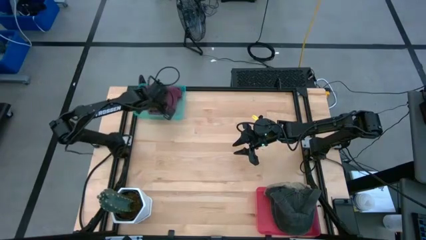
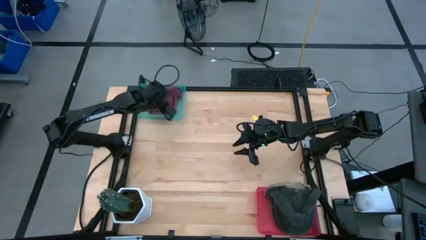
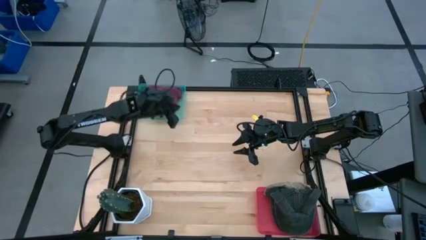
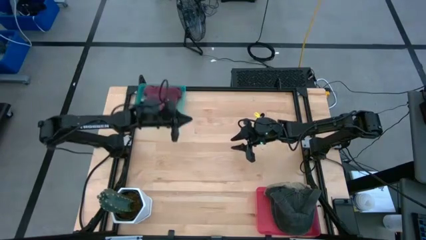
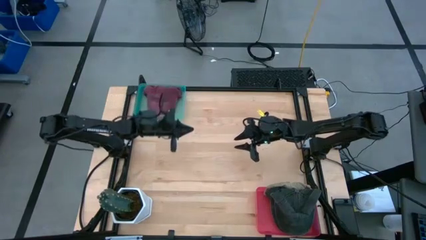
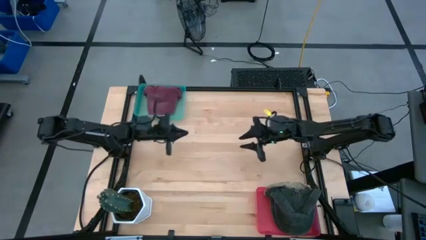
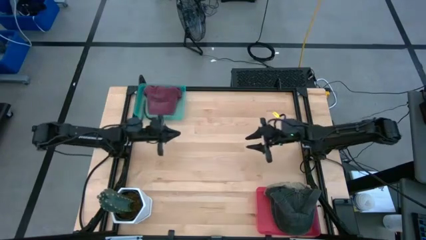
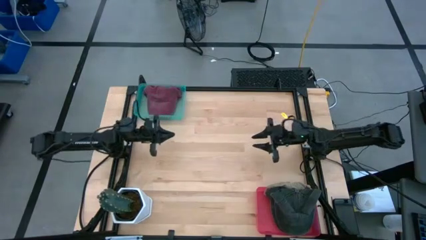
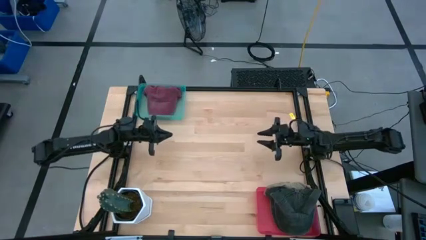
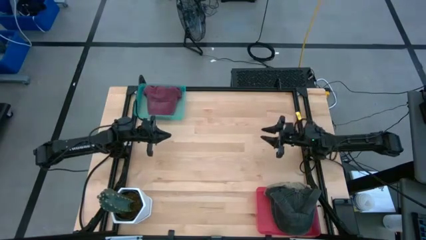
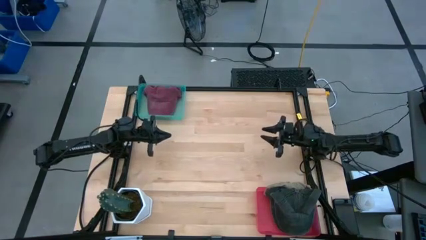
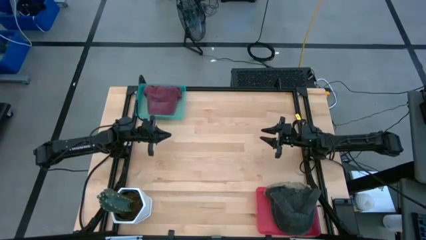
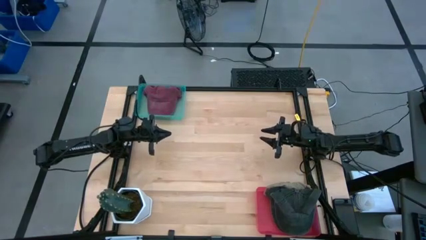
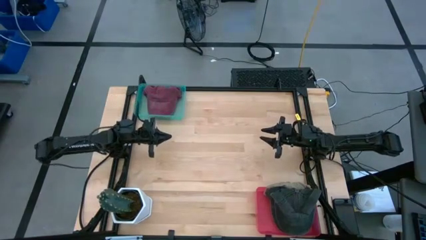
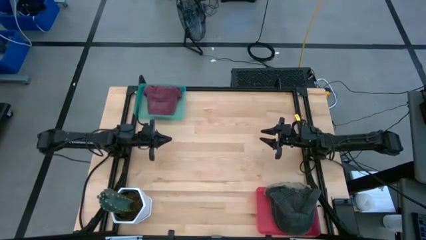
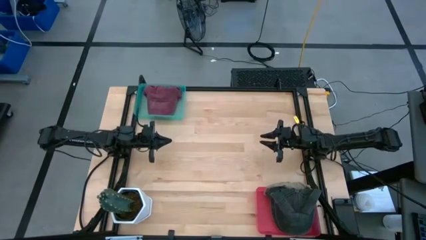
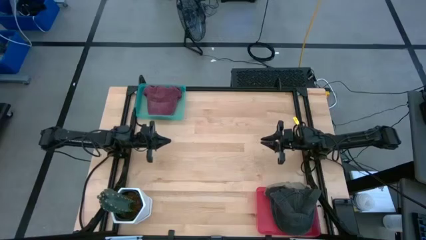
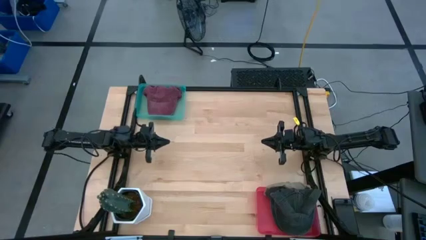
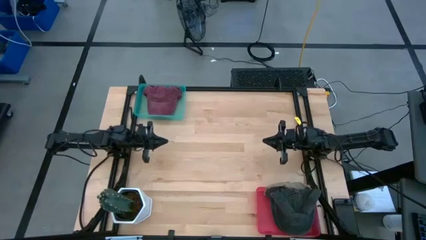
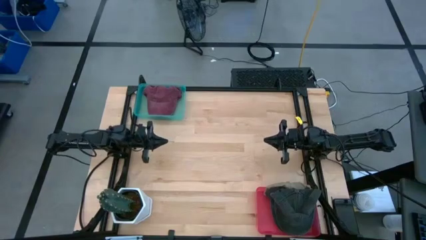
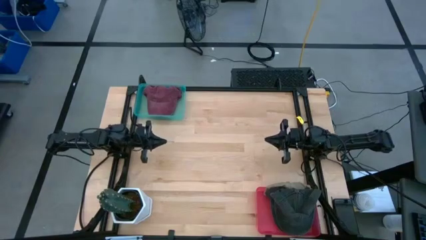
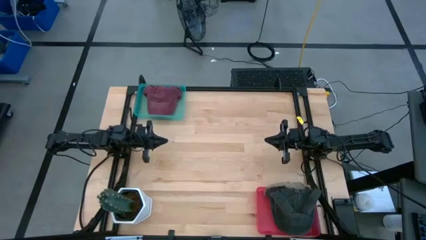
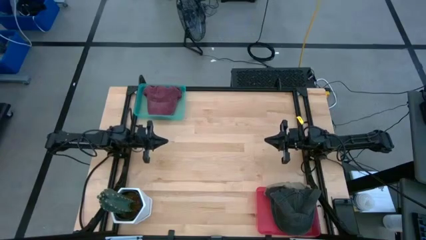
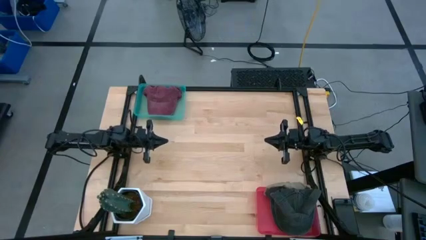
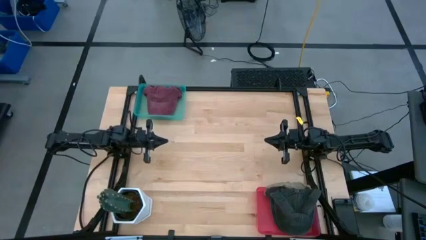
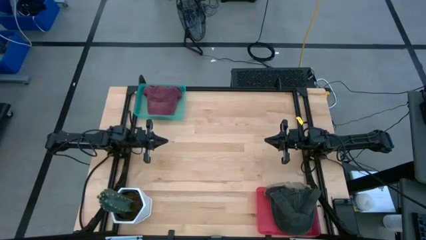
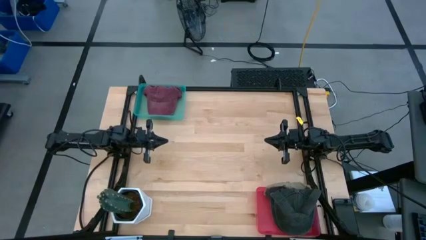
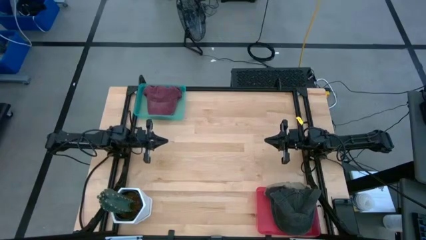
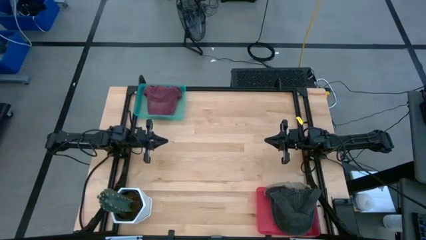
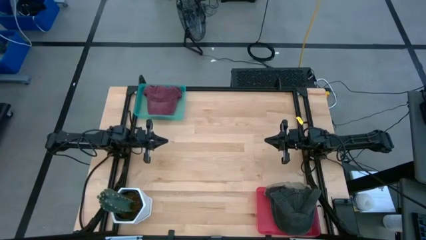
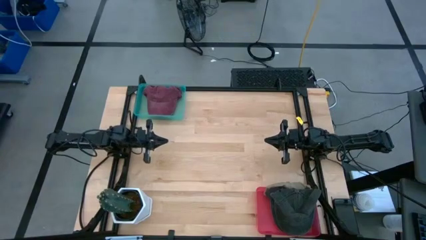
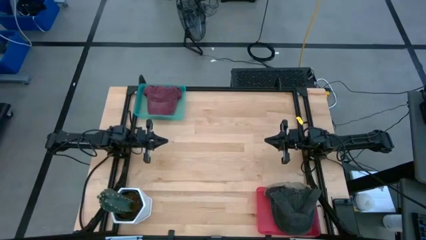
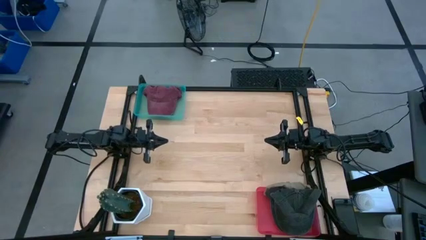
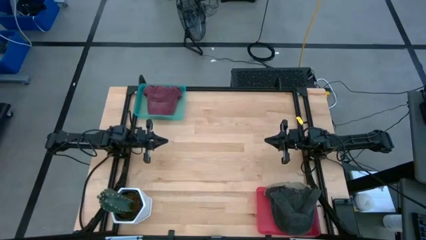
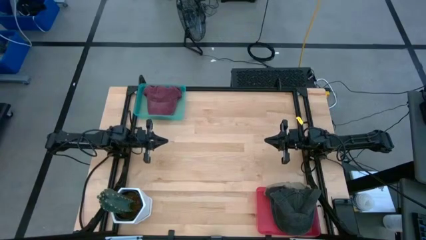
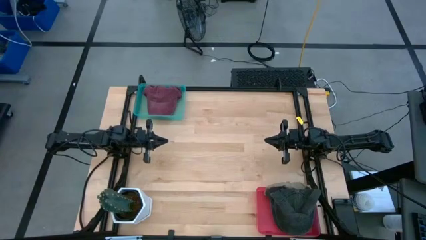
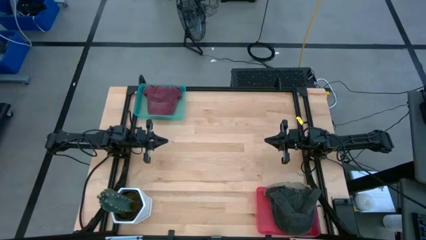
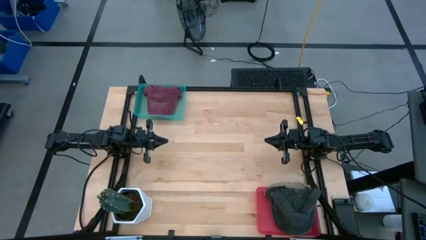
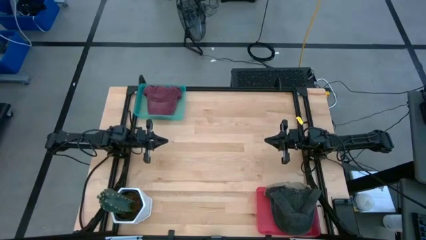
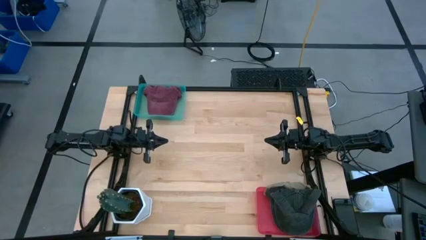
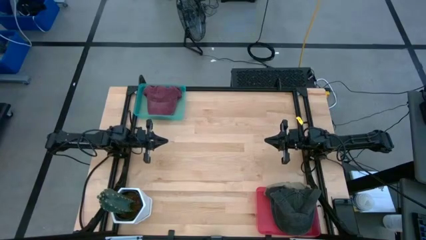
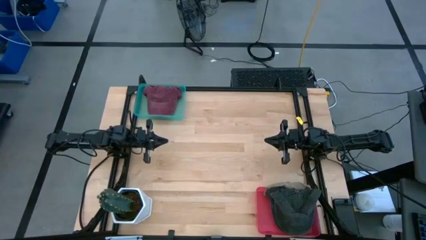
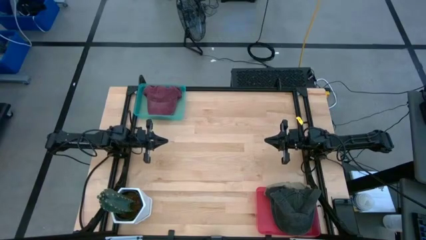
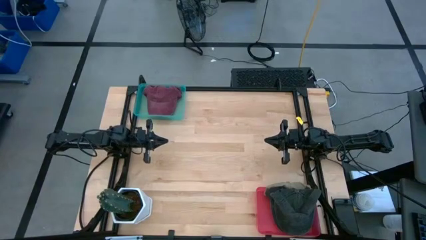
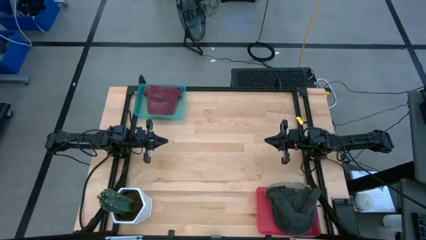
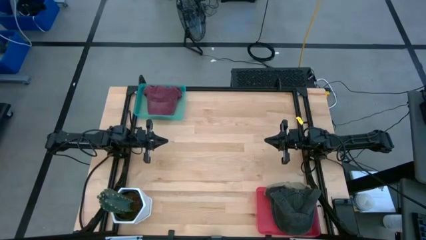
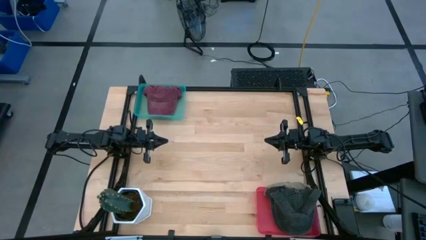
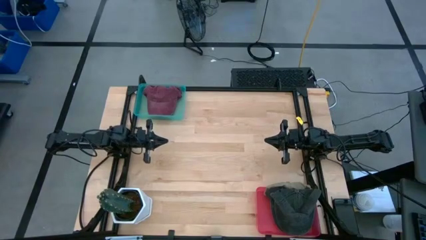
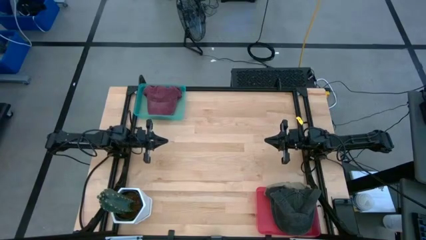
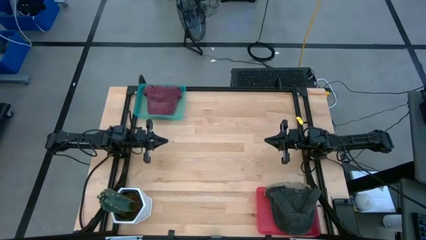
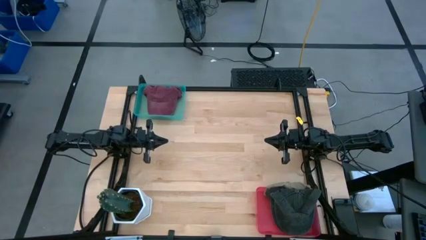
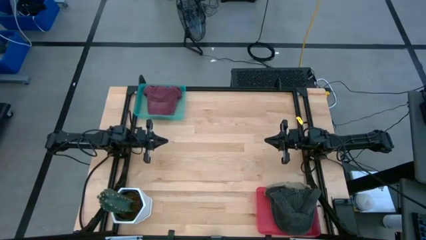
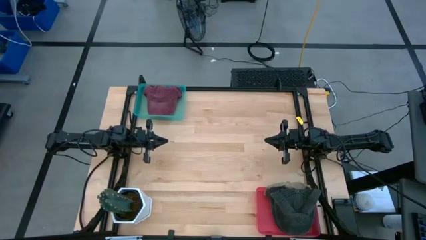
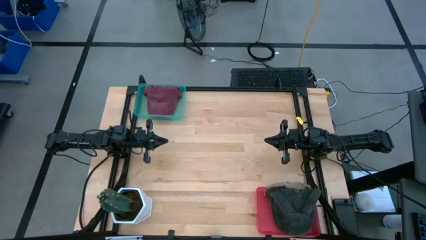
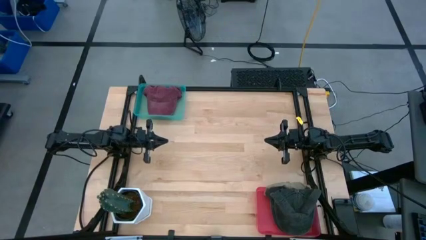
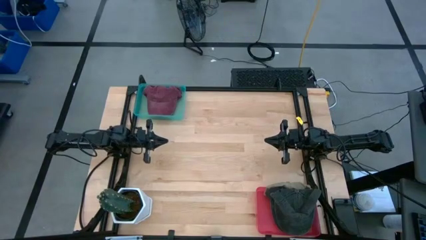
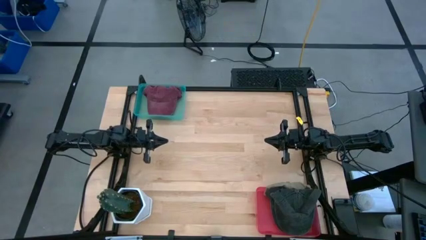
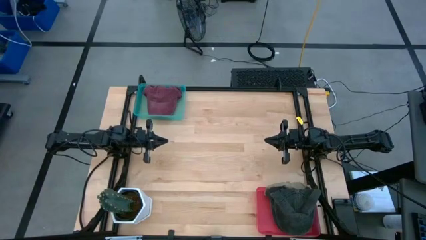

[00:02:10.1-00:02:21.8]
Task: Pick & Place hat
Return to Home Position

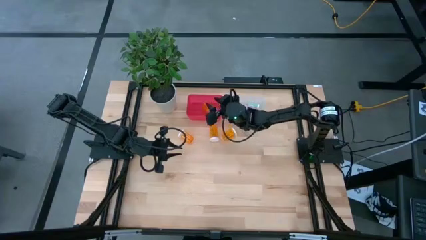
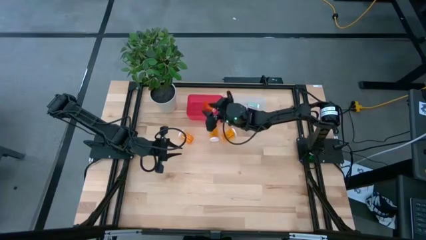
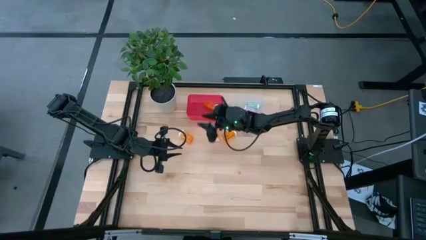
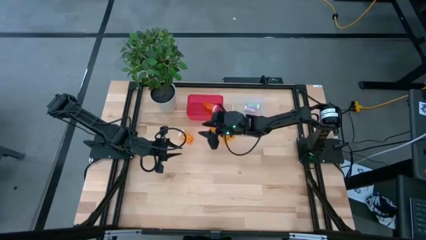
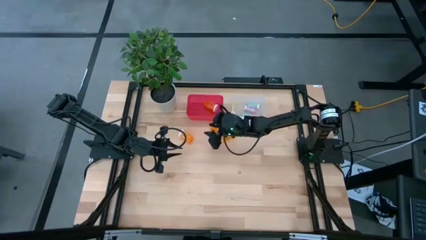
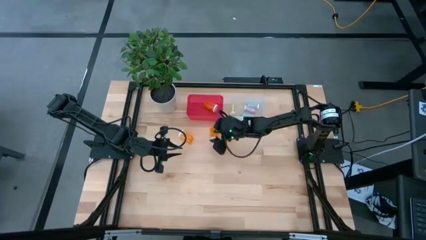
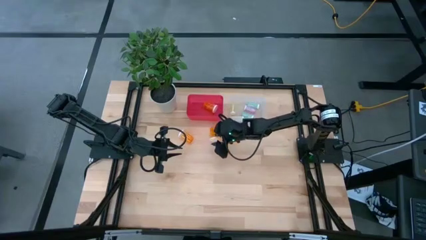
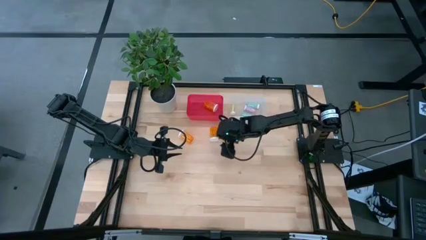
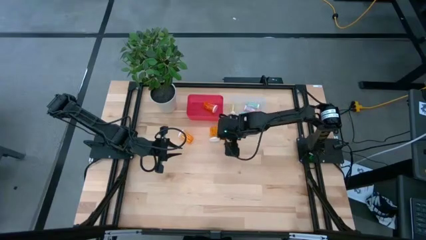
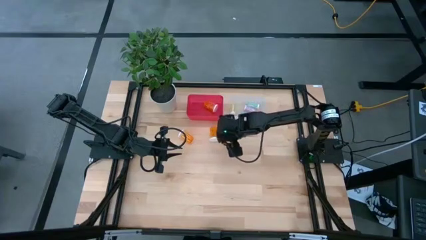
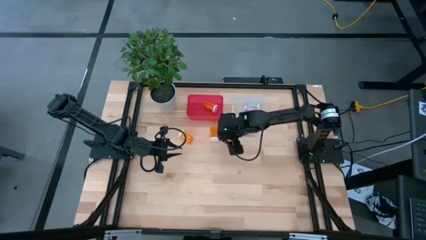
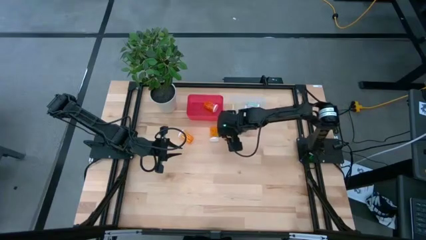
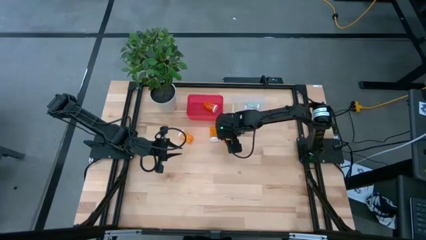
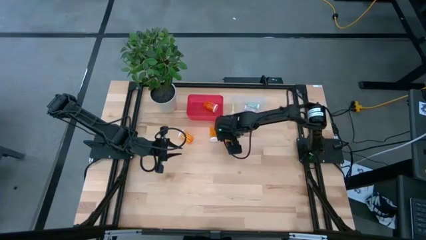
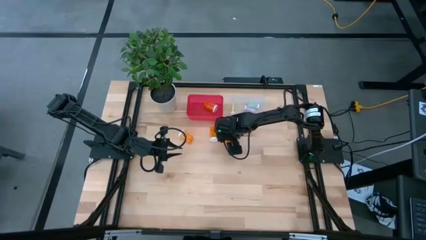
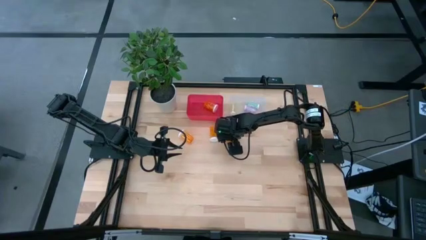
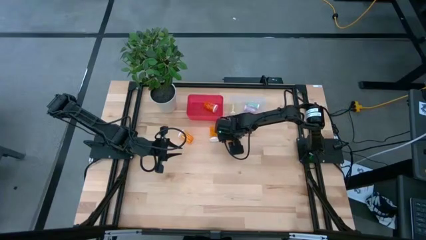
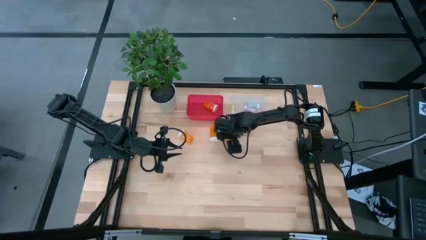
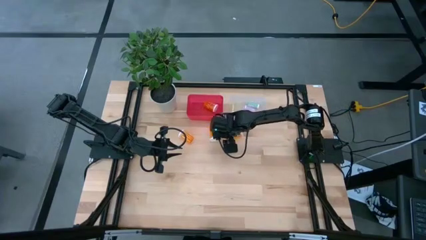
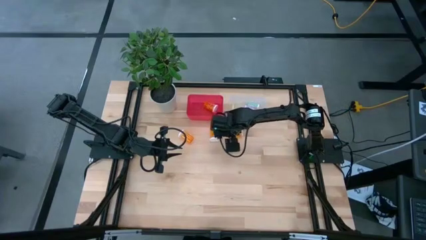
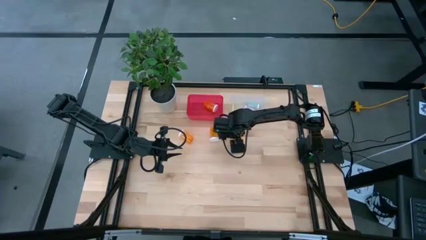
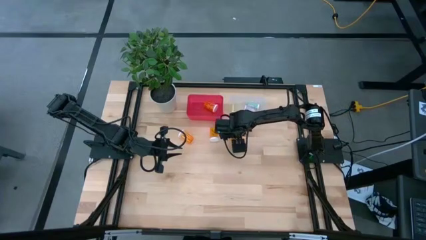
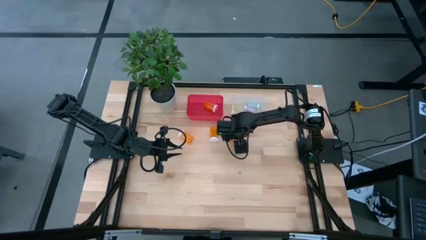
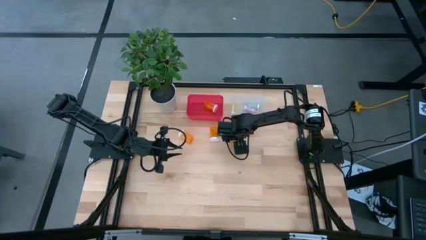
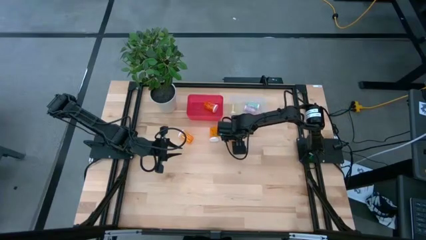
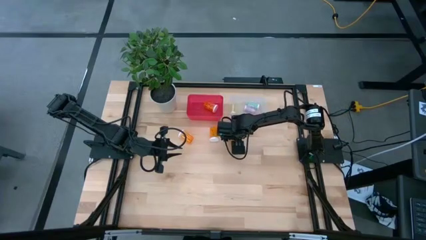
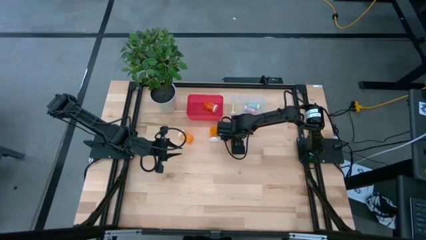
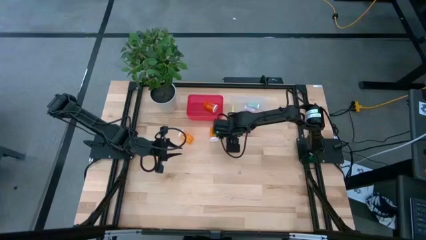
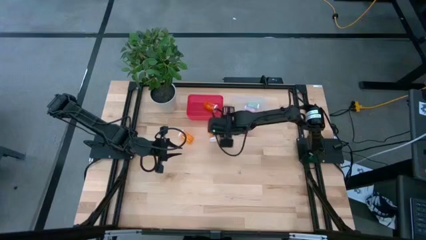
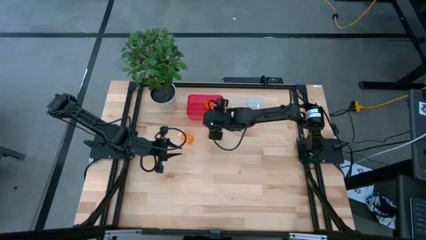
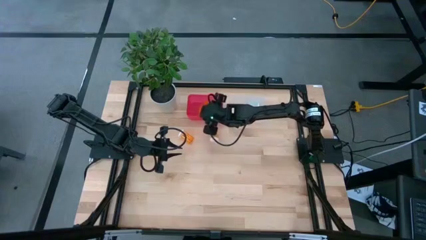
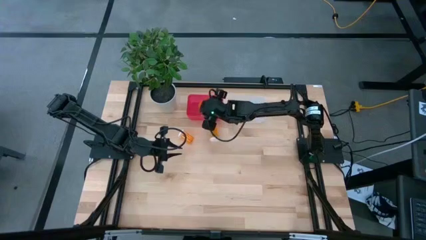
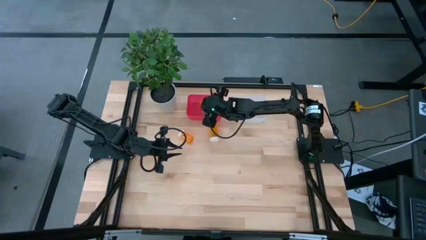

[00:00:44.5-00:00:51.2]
Task: Pick and place medicine bottles into bin by pill shape (circle, oval)
Put the orange capsule bottle into the red bin
